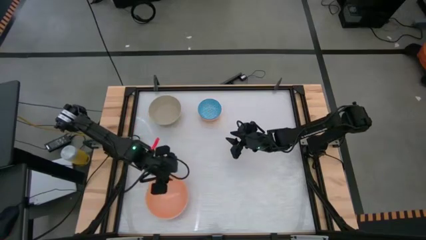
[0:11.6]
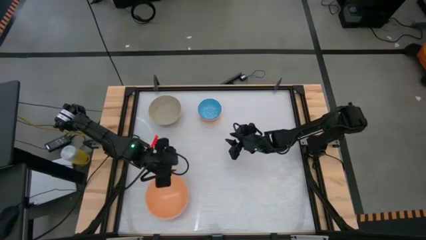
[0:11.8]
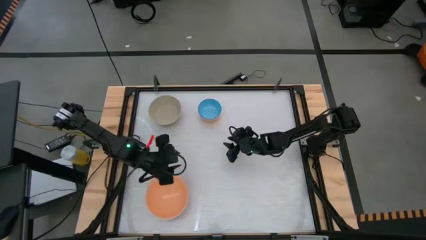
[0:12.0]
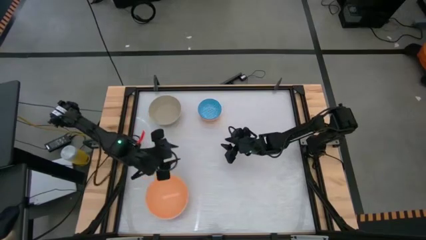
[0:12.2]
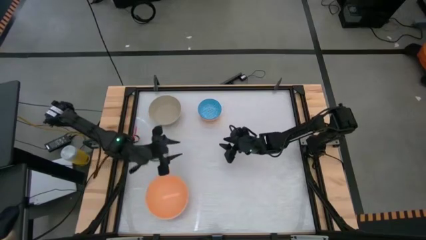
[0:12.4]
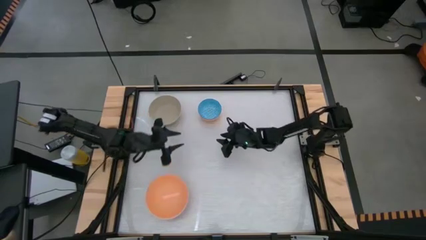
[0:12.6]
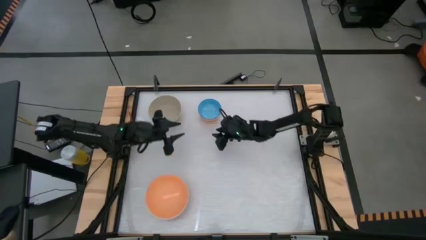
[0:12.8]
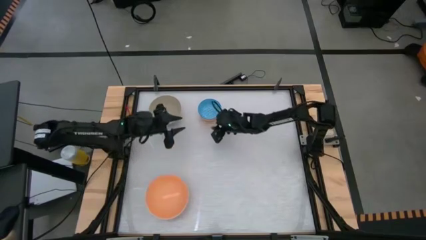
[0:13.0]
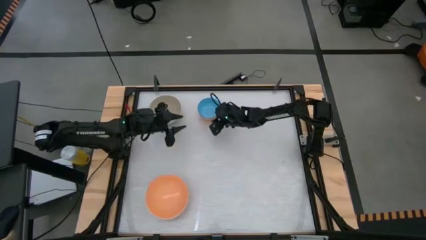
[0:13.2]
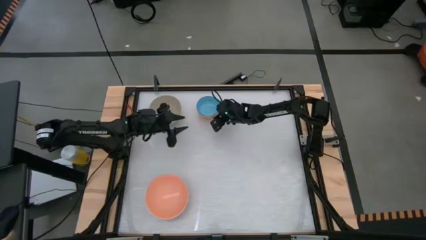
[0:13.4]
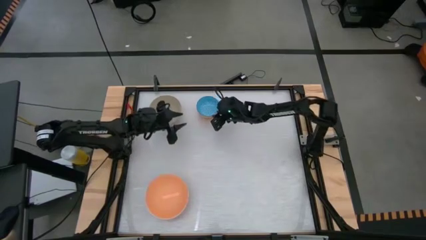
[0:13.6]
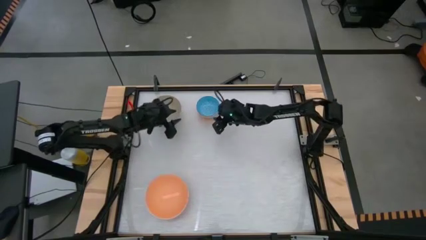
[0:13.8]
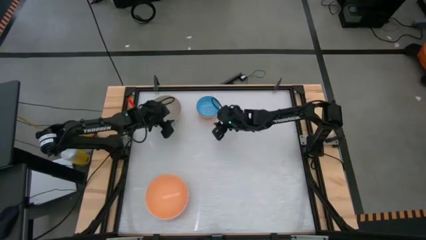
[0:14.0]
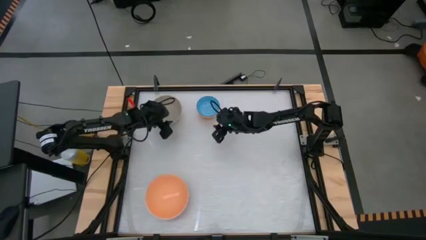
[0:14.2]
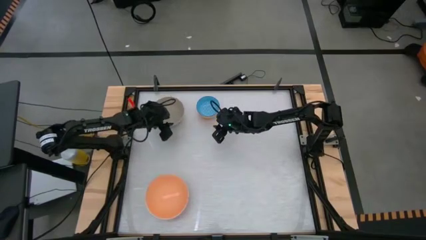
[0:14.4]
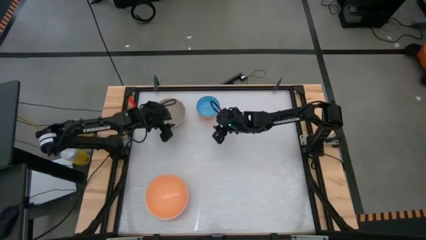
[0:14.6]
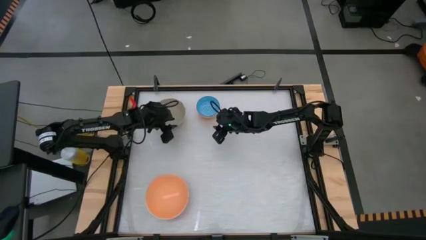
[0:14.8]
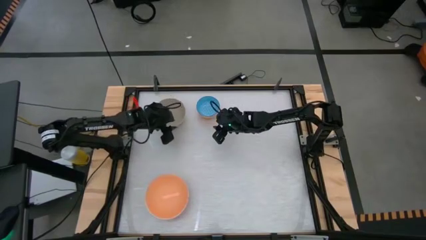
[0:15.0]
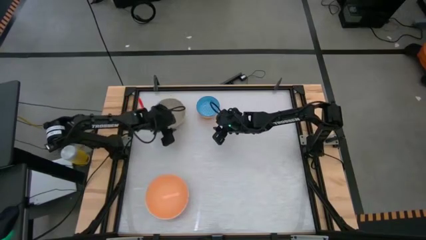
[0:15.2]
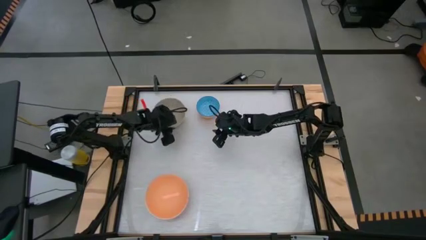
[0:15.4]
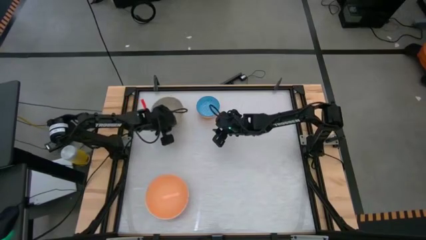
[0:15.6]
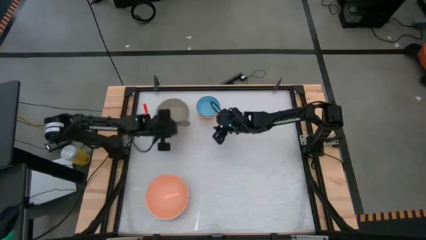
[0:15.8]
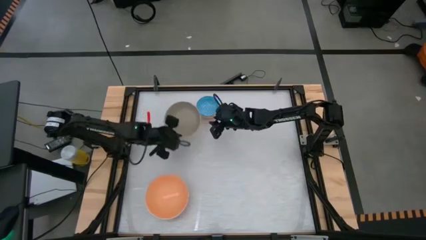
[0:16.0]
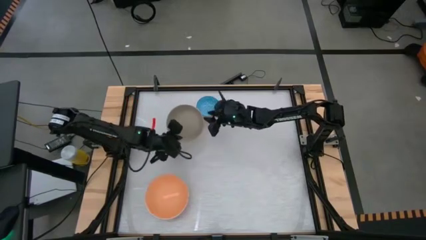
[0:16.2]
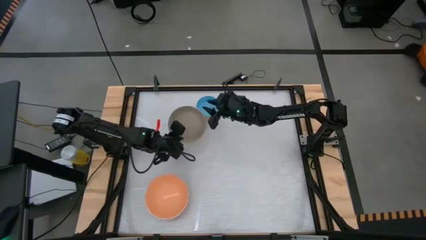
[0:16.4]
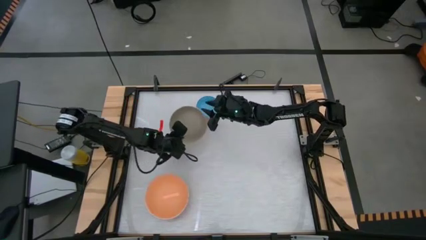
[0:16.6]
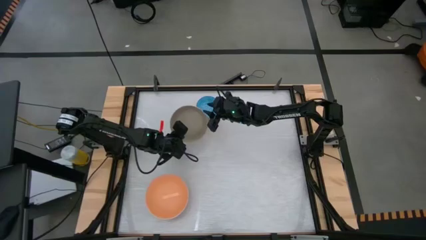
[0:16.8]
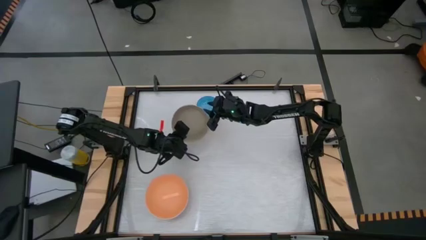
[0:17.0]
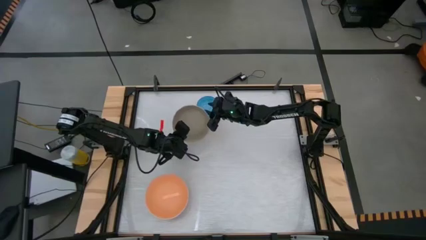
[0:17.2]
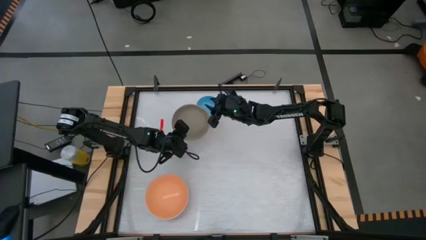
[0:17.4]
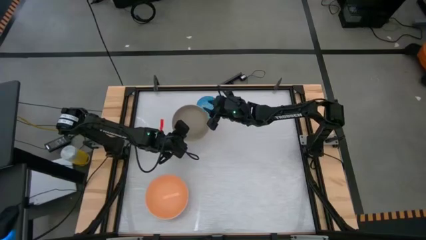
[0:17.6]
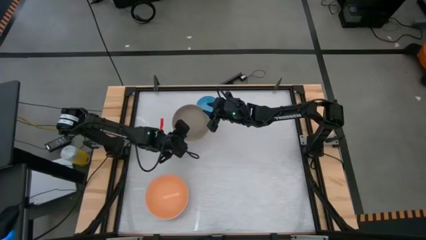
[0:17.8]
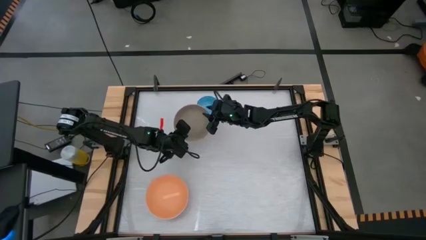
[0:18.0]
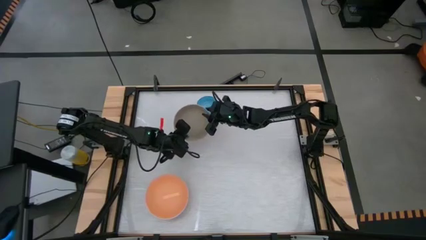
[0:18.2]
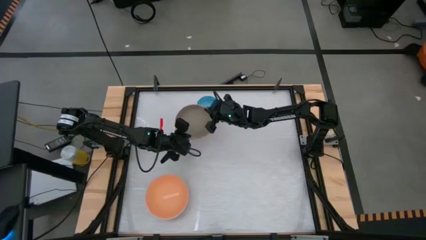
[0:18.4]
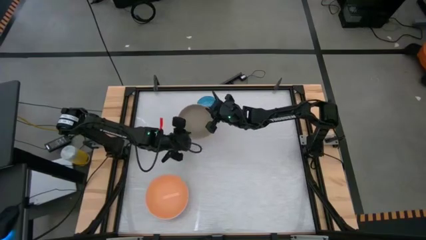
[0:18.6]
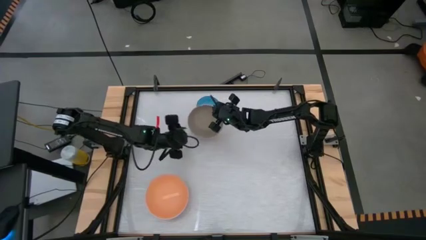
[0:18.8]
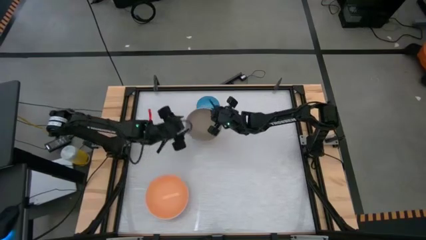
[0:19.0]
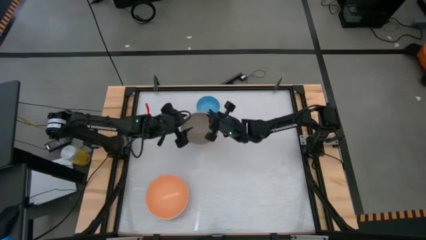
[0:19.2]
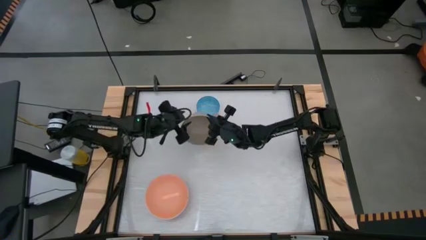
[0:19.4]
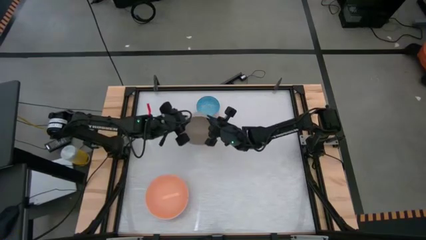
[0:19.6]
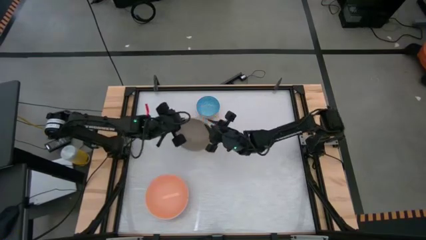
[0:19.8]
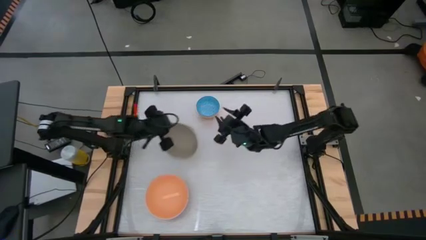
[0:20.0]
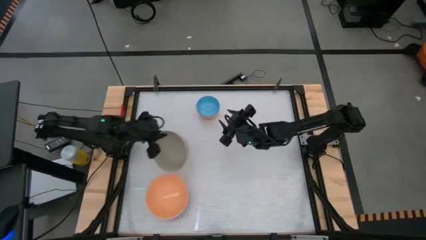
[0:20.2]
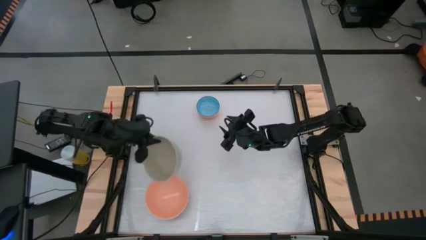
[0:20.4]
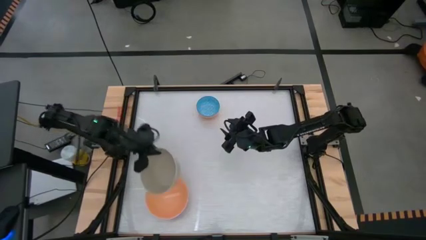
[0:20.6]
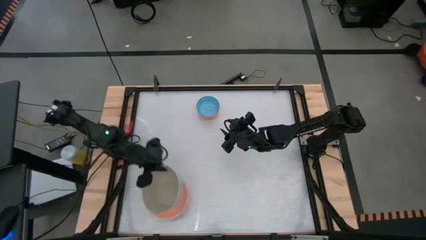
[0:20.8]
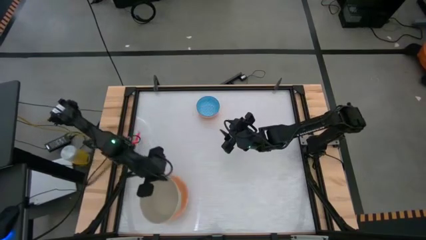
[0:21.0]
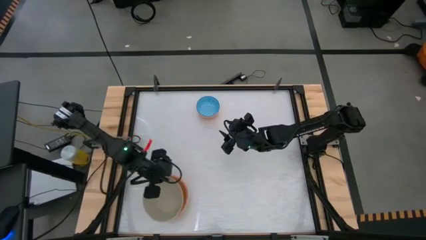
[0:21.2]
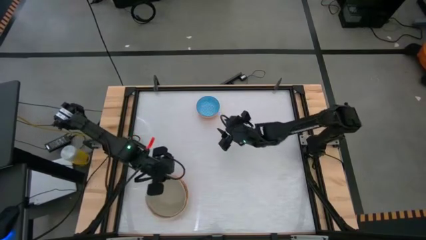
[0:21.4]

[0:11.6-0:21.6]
Stack the gray bowl on top of the orange bowl

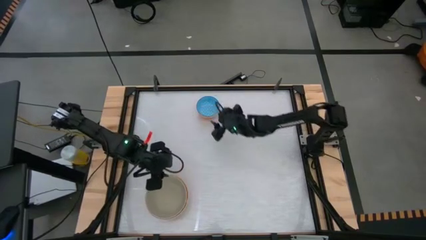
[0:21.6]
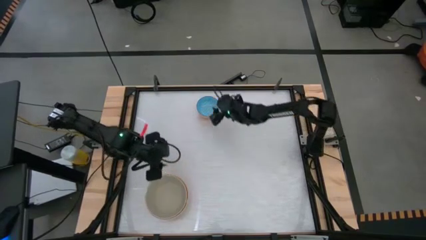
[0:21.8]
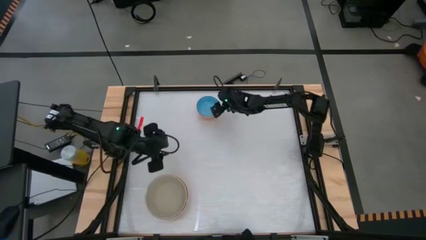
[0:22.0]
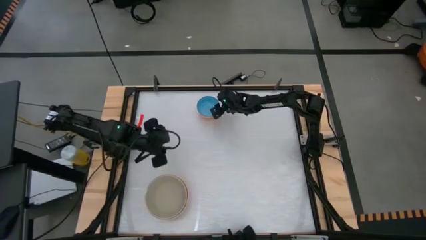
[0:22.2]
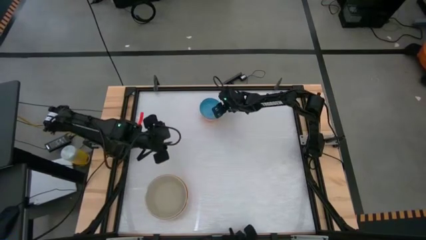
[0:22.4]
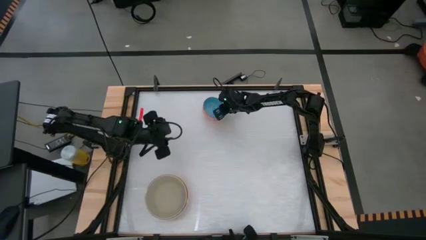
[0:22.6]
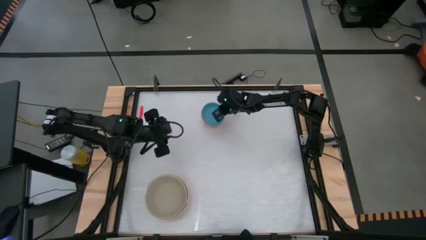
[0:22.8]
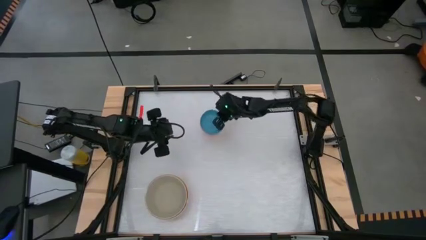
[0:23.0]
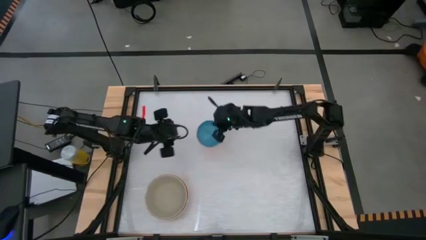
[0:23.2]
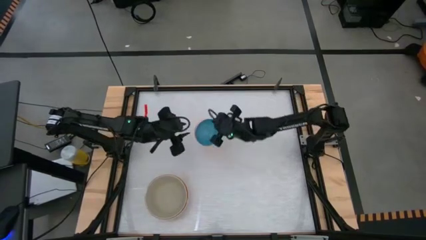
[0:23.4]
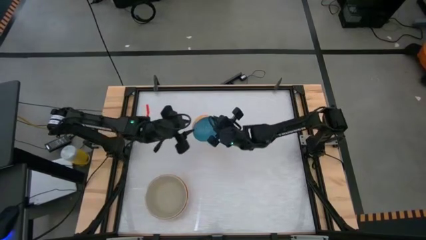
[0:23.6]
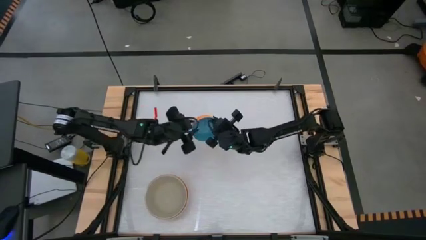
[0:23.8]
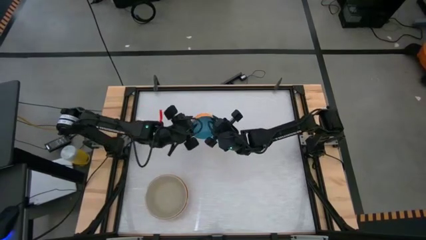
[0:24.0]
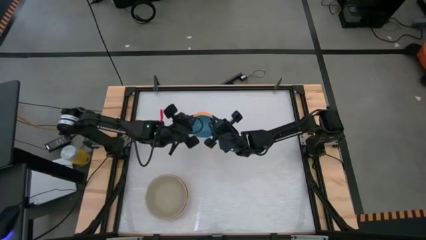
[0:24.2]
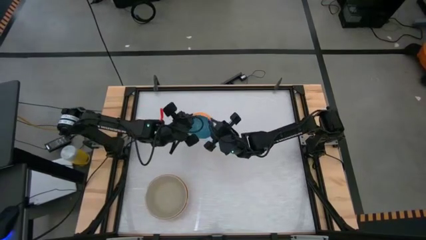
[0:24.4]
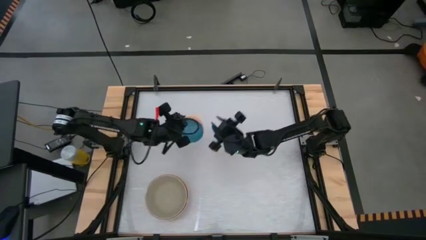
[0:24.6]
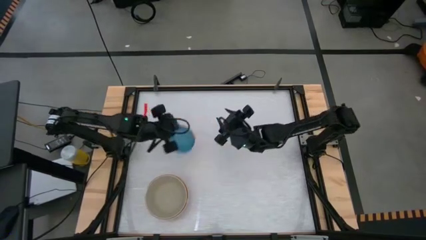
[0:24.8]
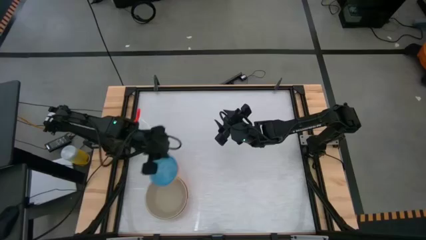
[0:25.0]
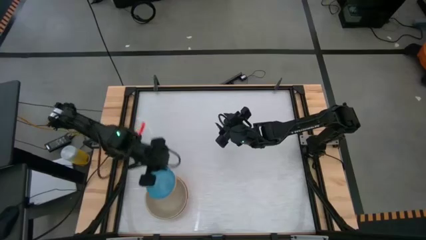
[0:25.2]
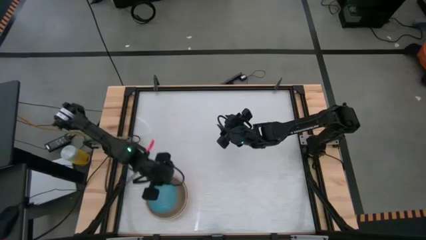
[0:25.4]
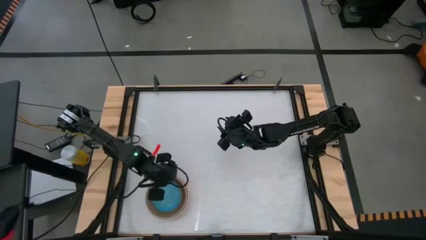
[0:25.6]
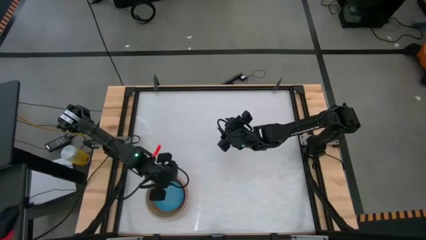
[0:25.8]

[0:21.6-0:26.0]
Stack the blue bowl on top of the gray bowl
